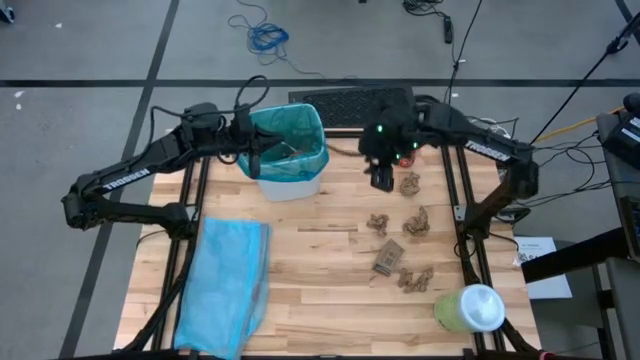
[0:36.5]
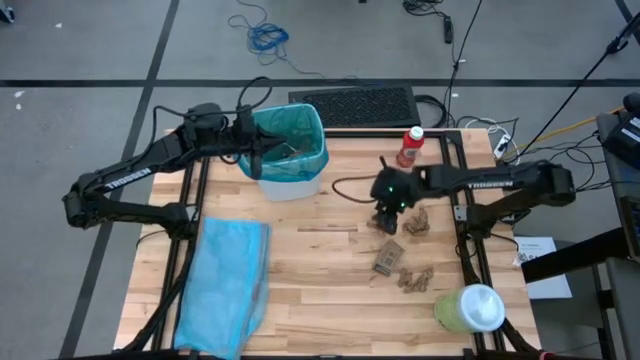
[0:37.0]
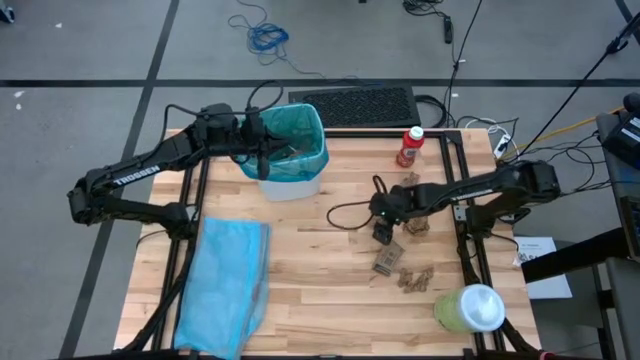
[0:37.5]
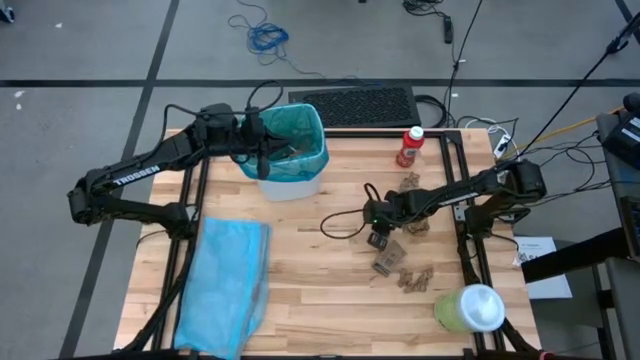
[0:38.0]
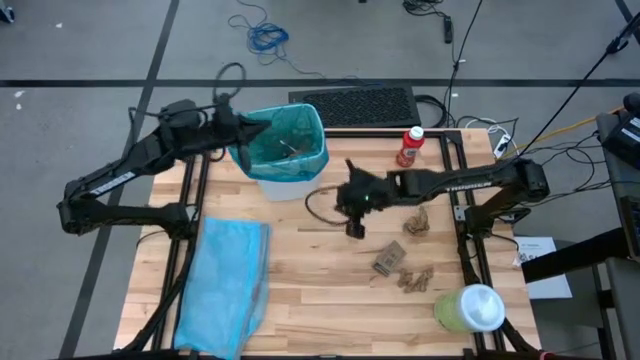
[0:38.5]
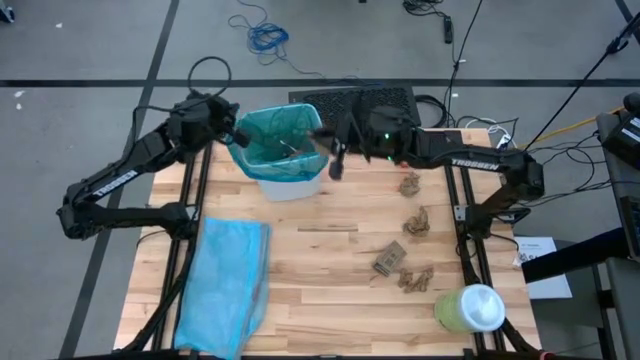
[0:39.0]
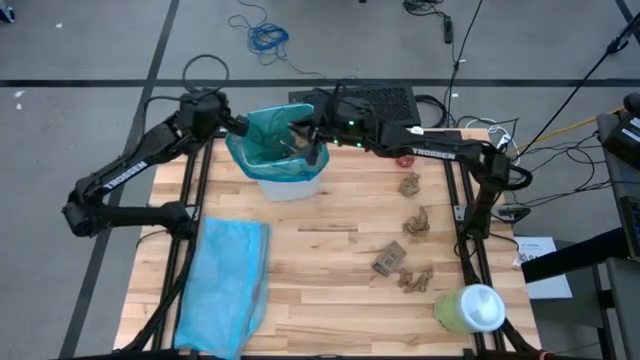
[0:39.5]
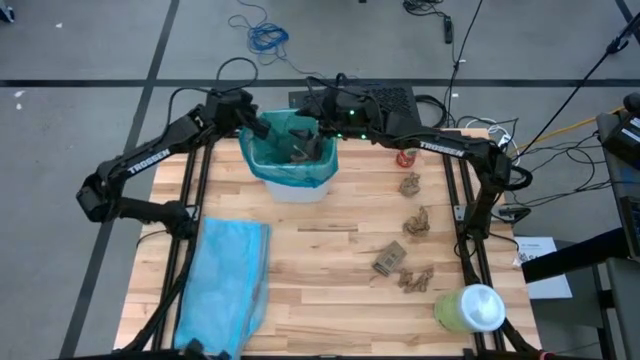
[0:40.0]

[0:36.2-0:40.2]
Task: place trash/remove bag and relplace
Put the brown napkin into the trash bin

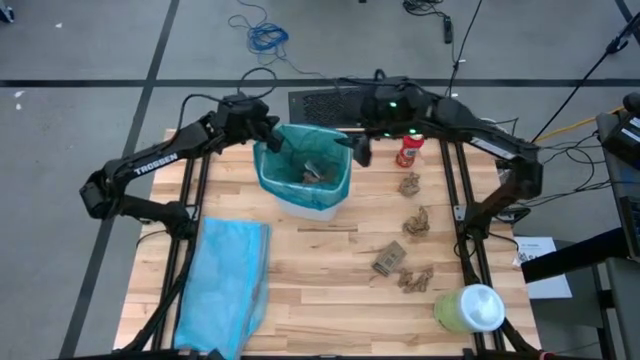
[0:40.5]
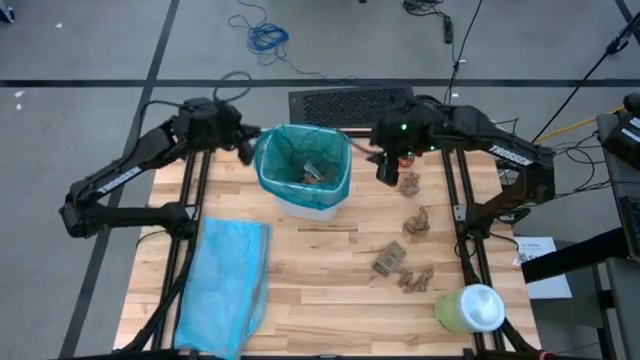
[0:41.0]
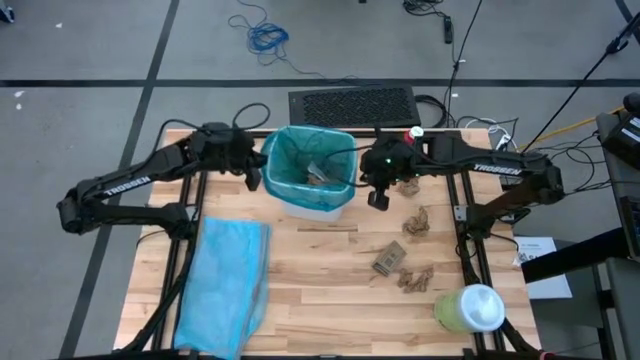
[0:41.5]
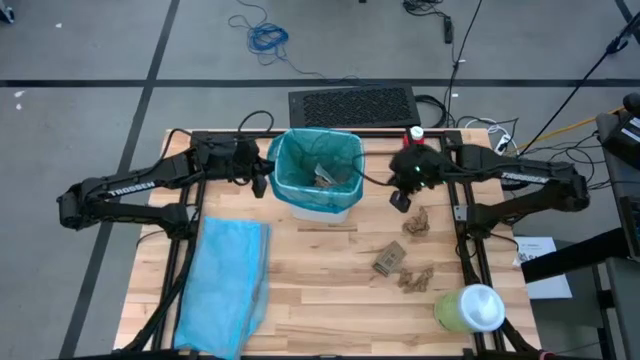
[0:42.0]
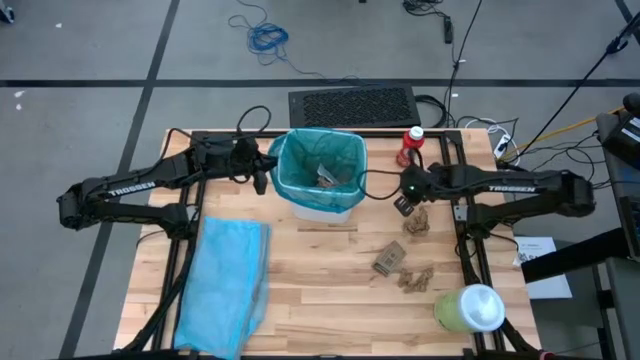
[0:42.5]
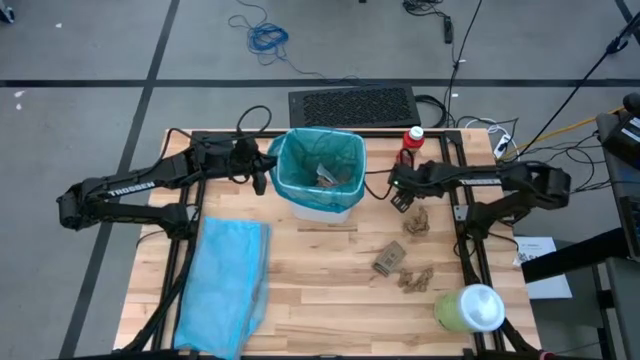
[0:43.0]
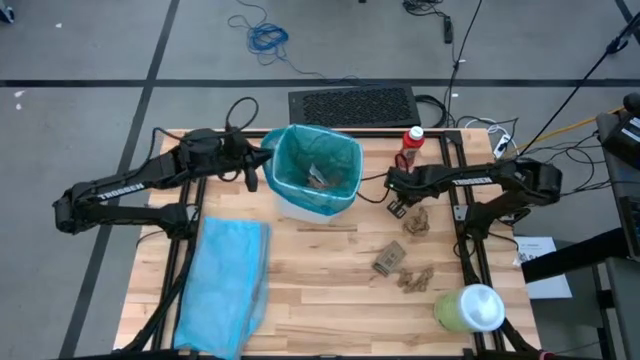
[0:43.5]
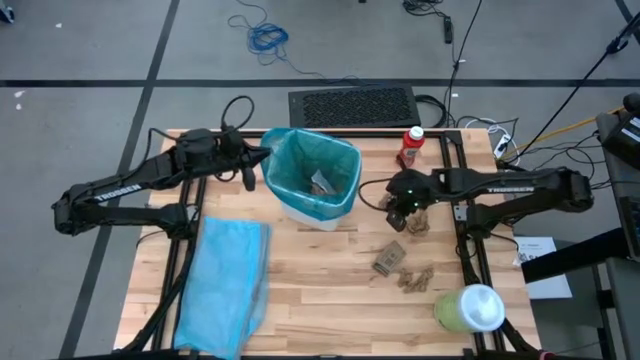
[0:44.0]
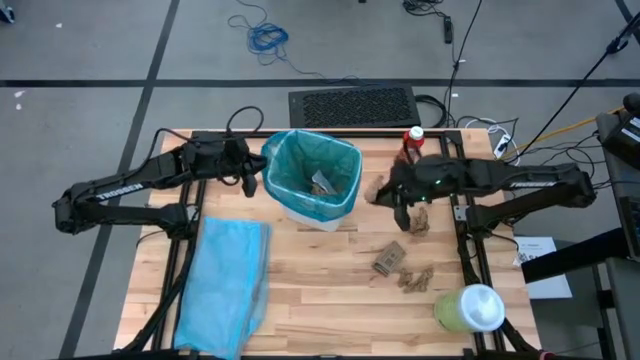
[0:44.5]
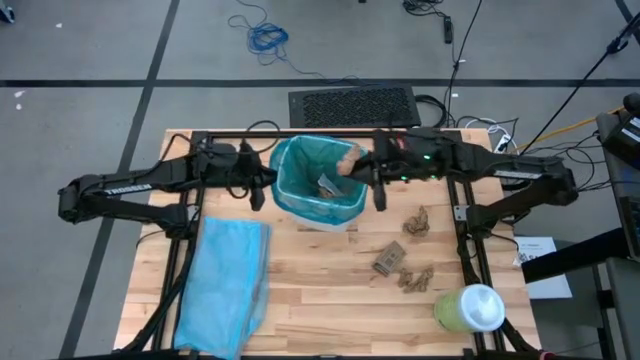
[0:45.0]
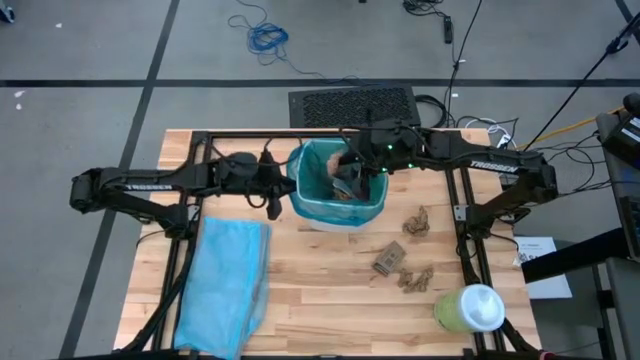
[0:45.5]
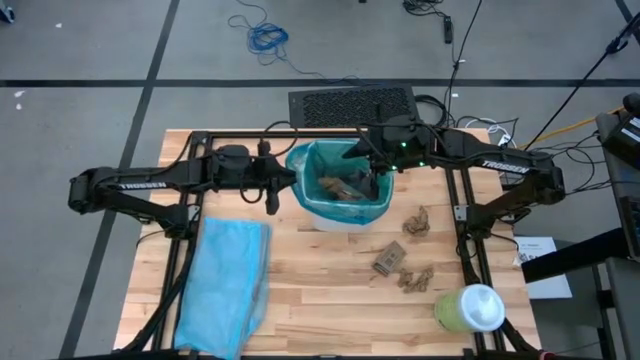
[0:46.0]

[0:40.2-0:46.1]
Put the brown napkin into the trash bin

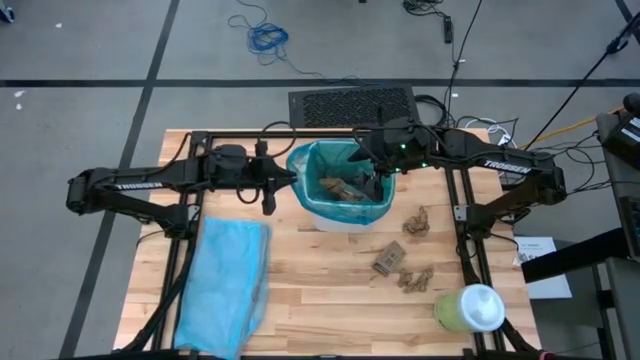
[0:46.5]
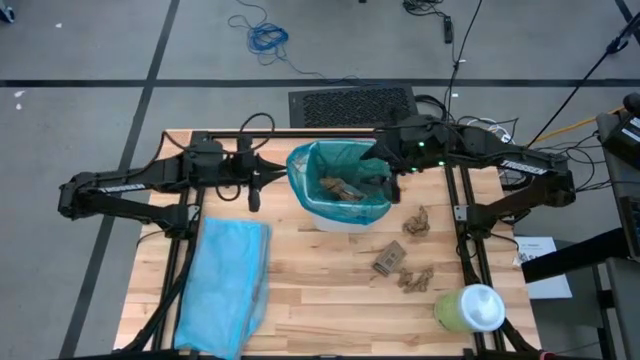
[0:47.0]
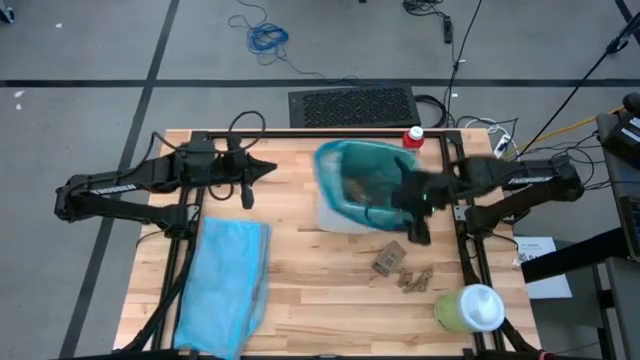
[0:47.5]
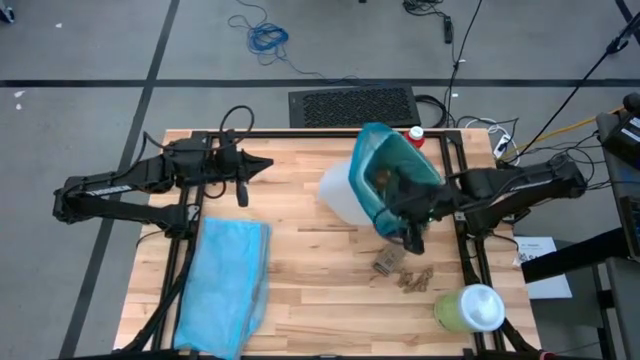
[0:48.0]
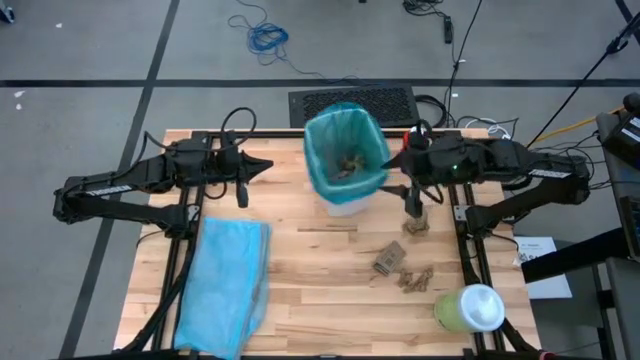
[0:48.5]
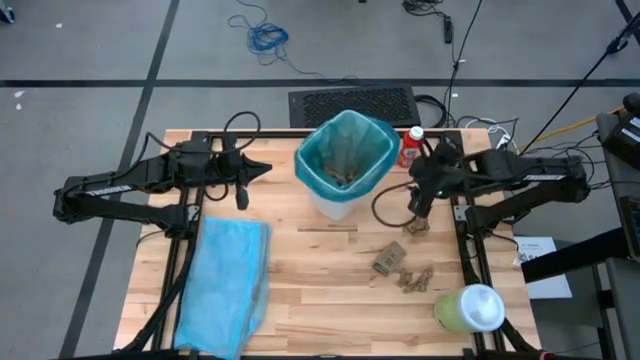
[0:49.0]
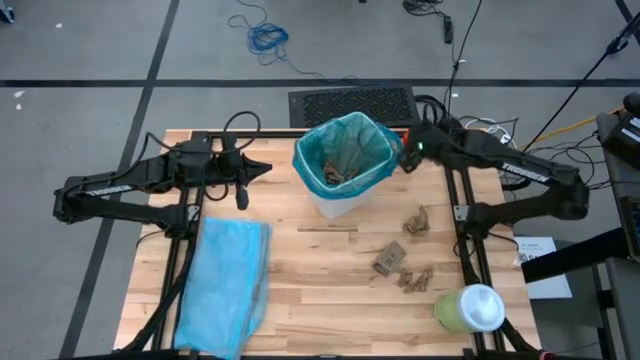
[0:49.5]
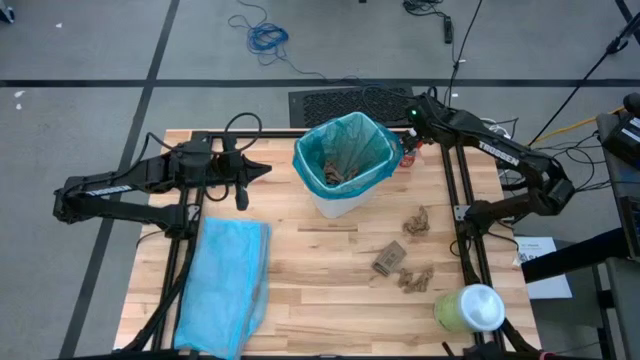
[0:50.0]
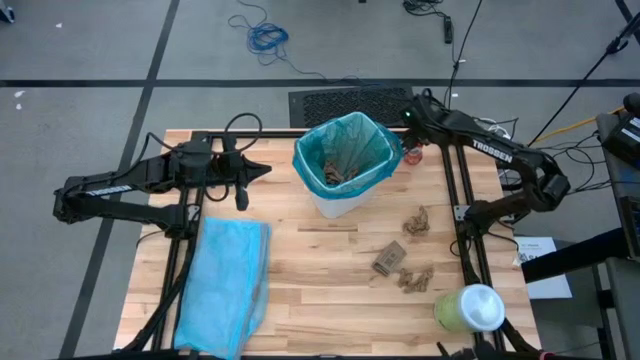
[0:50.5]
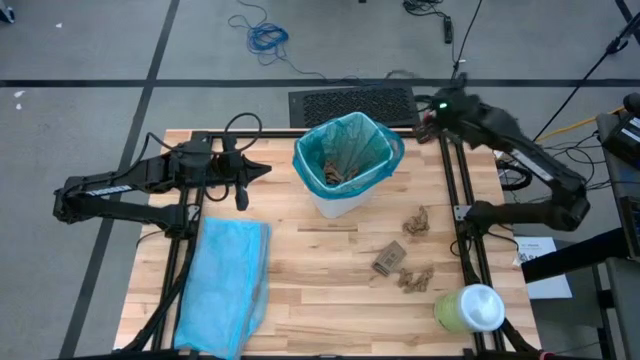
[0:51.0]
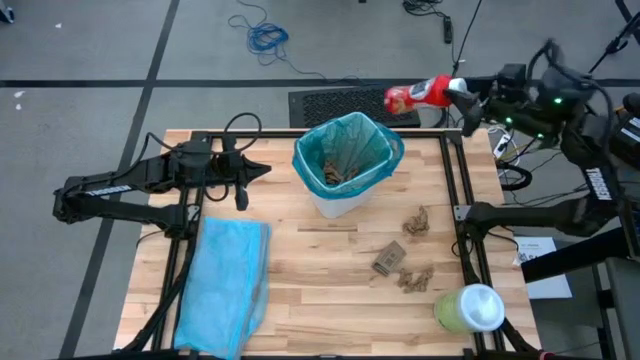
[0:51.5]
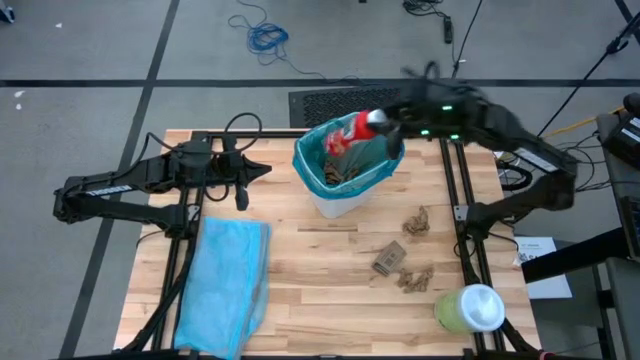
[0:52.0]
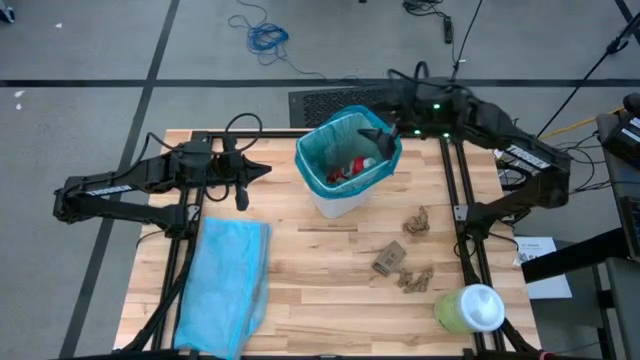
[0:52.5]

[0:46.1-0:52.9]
Put the plastic bottle into the trash bin

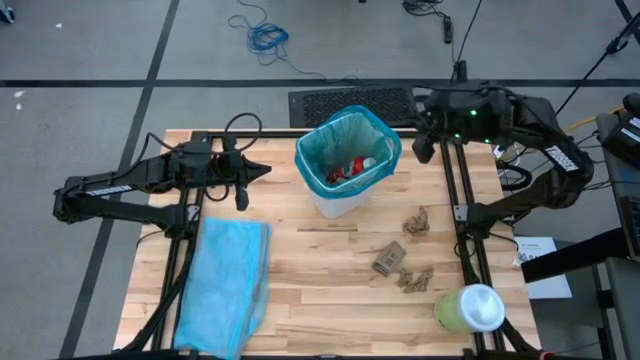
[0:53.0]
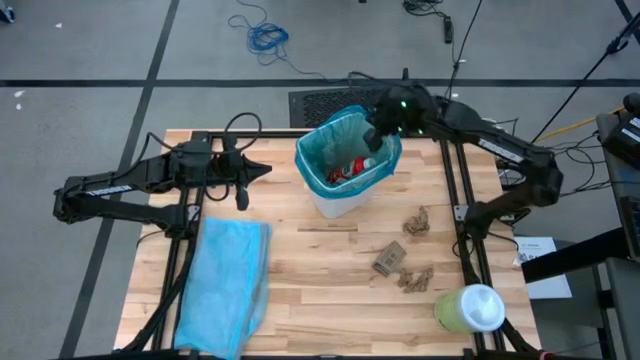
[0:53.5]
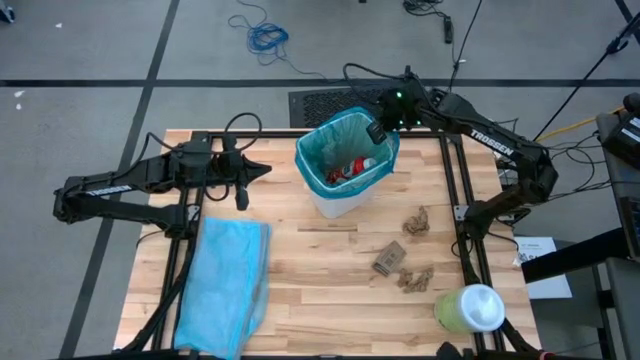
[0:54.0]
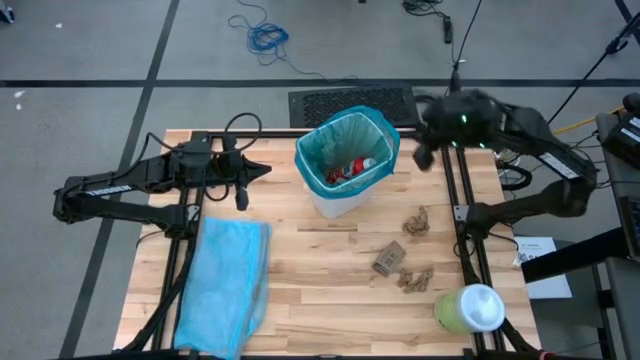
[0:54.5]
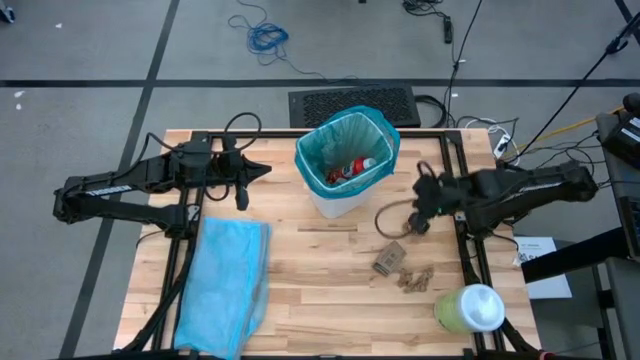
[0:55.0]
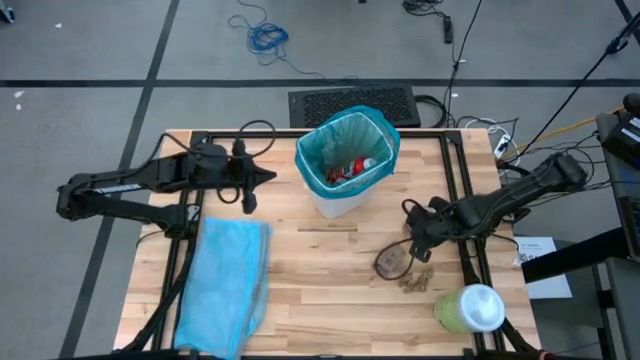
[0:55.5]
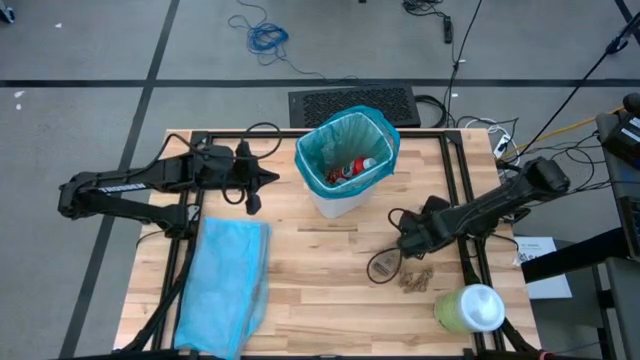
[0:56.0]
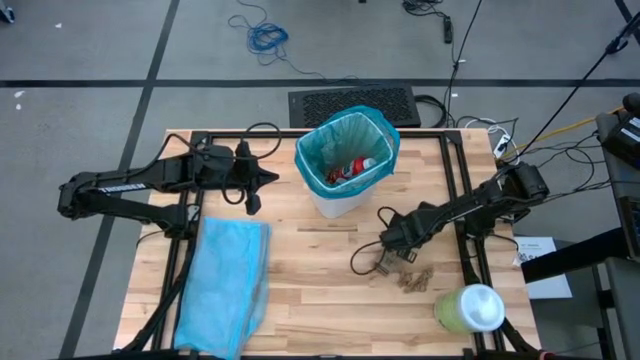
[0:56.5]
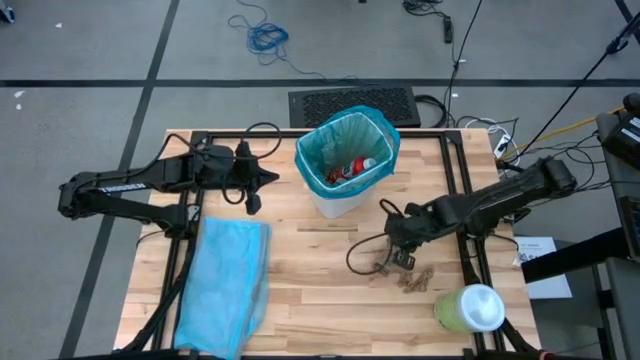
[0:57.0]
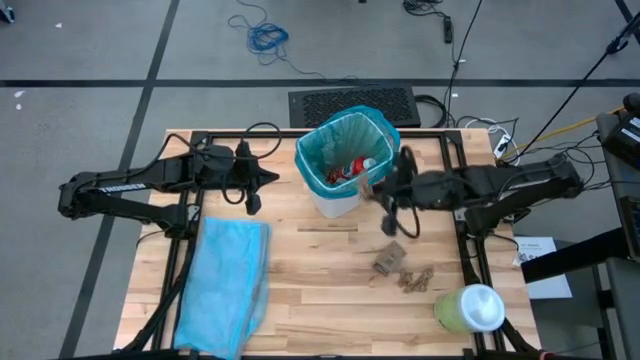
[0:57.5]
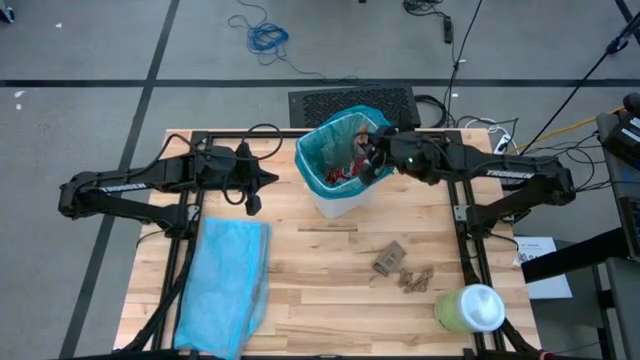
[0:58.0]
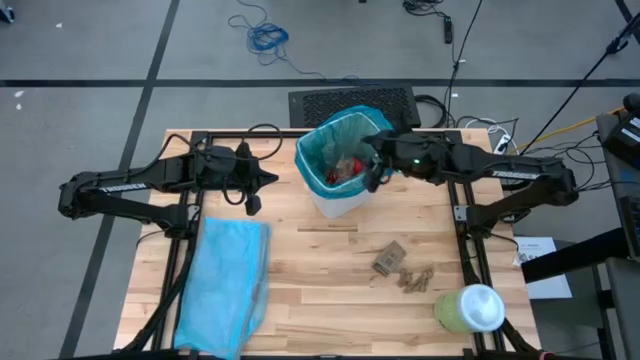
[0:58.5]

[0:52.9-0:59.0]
Put the brown napkin into the trash bin
